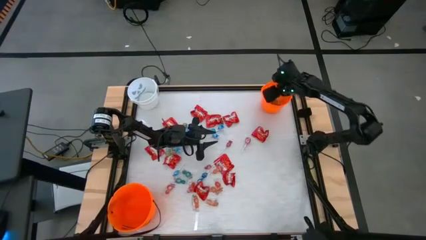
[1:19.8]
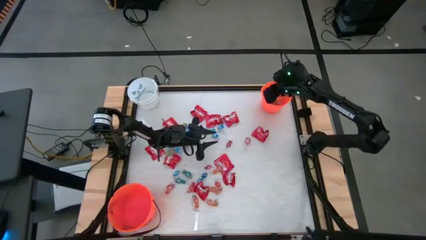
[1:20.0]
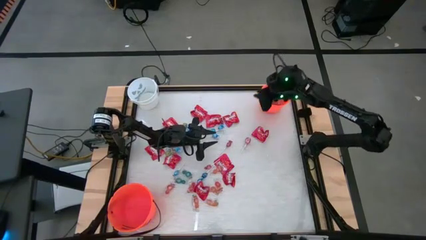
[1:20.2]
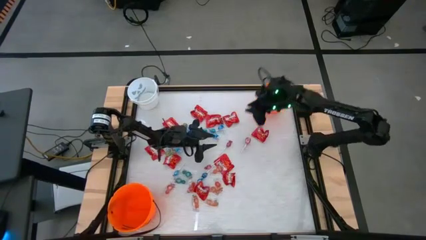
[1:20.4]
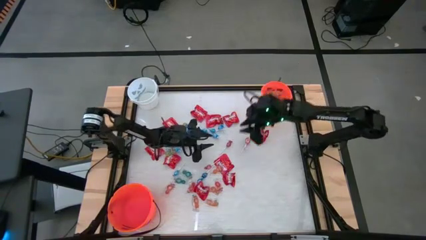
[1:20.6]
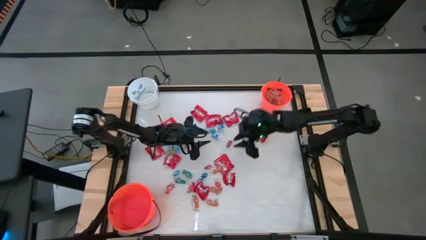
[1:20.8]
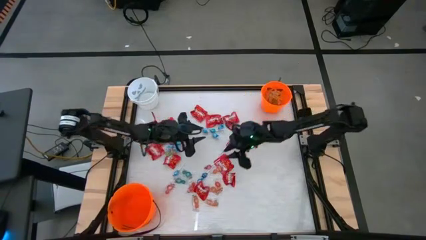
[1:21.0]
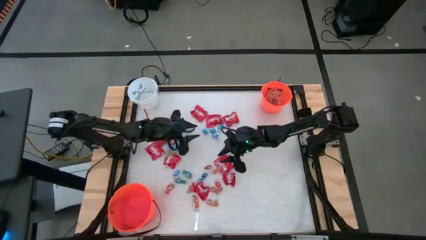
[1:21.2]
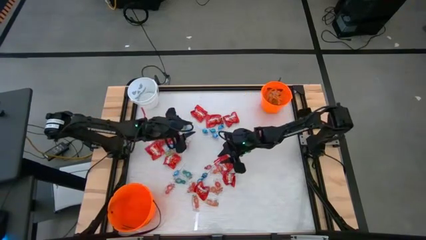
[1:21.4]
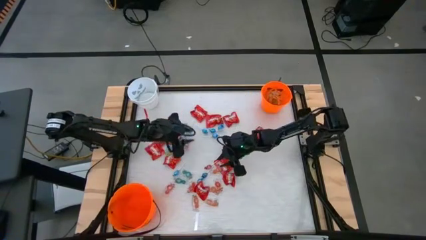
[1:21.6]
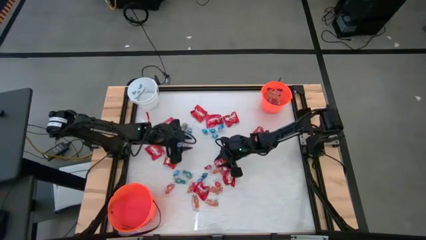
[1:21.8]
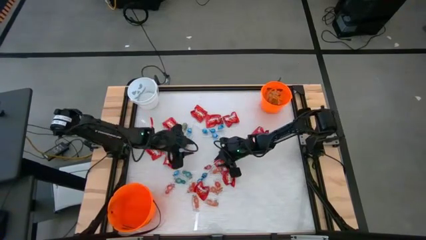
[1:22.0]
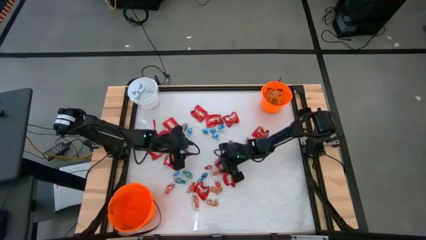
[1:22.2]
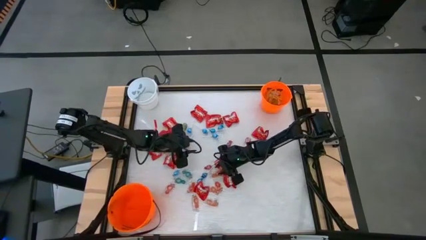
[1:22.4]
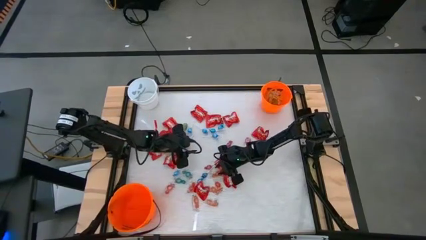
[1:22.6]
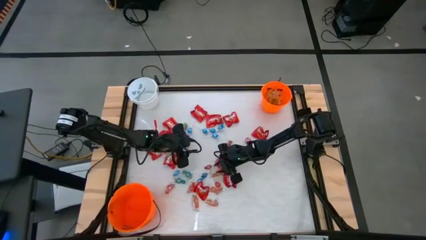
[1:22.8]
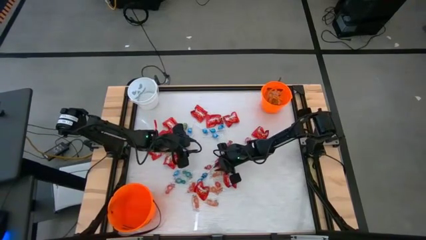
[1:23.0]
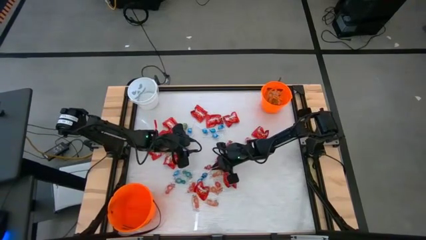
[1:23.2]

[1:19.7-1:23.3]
Task: Sort candy by brand, put in halloween buckets
Put the orange gummy into the top orange bucket

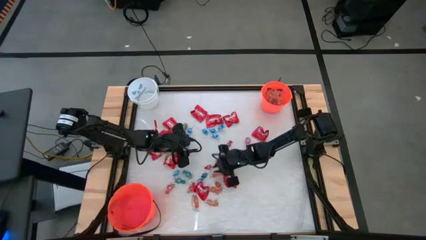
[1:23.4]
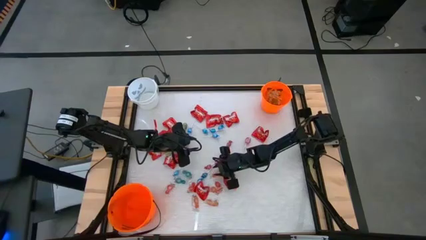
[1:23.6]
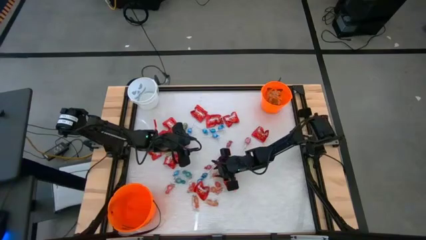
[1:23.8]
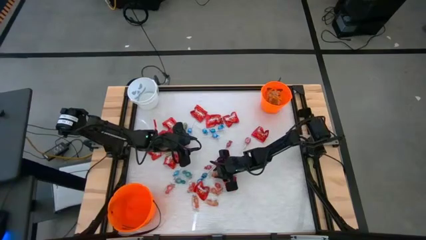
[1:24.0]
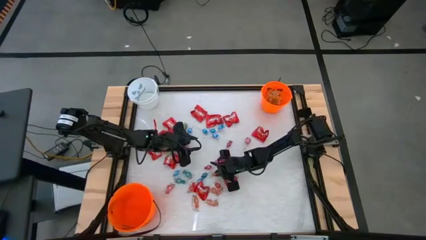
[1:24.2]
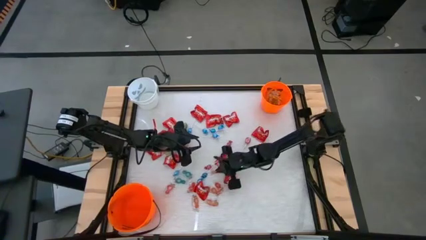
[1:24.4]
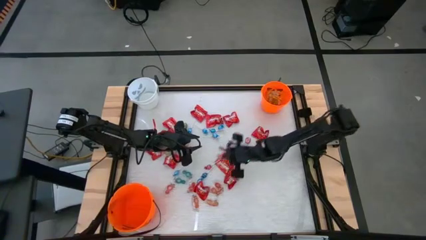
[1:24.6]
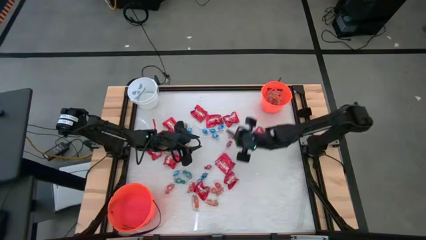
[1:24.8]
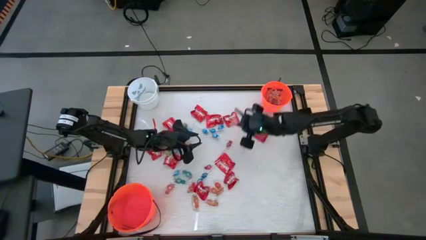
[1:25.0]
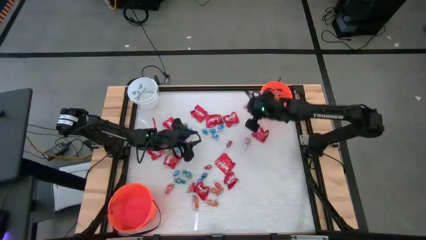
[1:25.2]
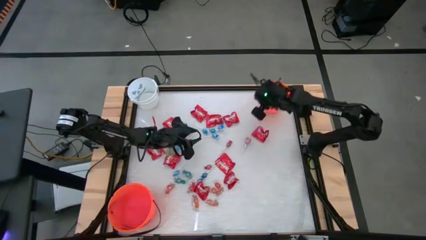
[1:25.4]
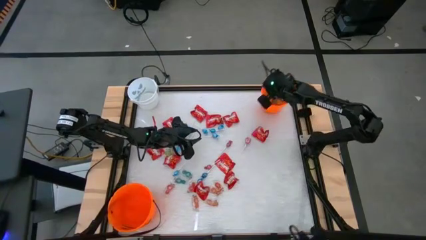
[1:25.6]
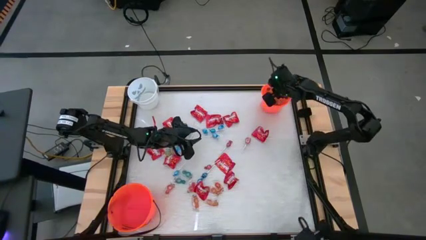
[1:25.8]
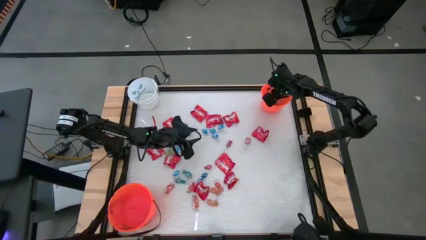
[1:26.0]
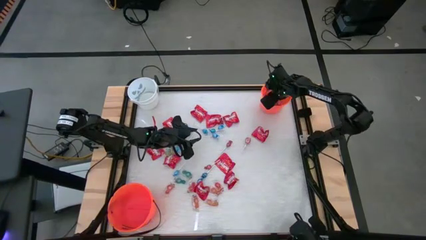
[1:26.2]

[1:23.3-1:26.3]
Put the orange gummy into the top orange bucket

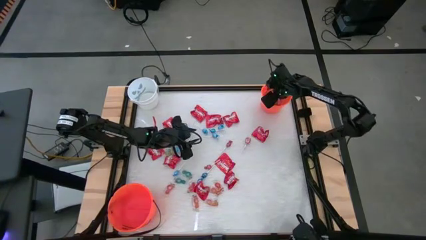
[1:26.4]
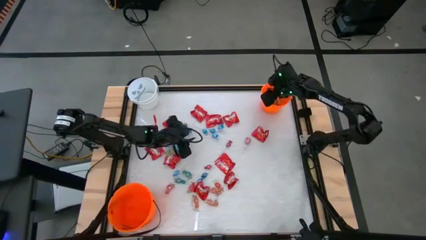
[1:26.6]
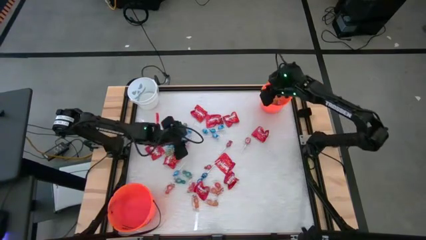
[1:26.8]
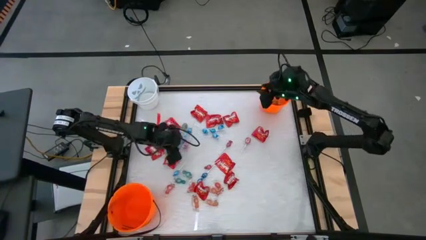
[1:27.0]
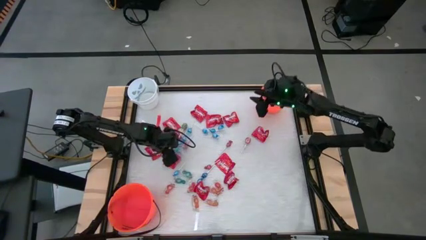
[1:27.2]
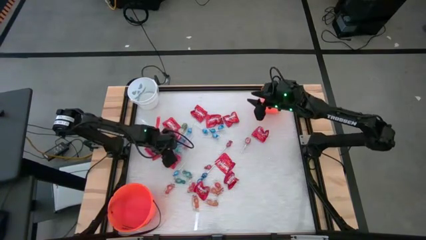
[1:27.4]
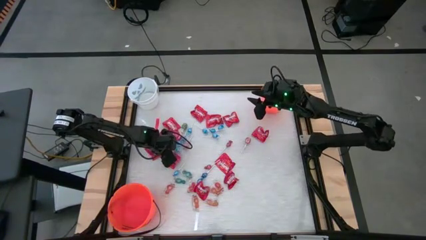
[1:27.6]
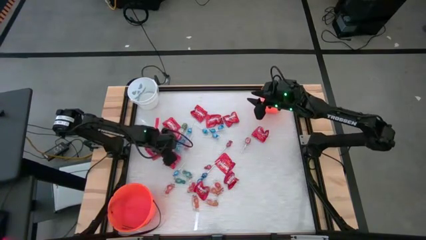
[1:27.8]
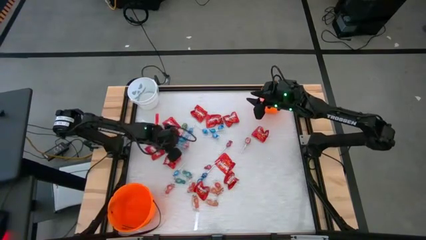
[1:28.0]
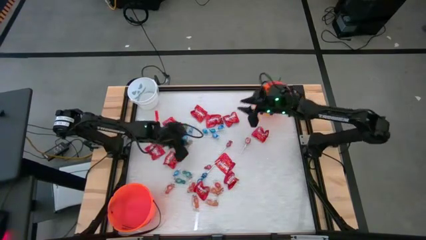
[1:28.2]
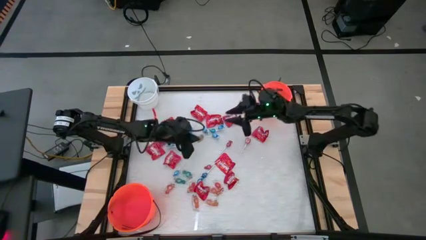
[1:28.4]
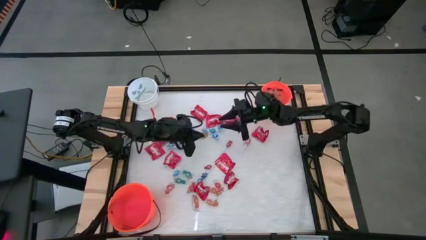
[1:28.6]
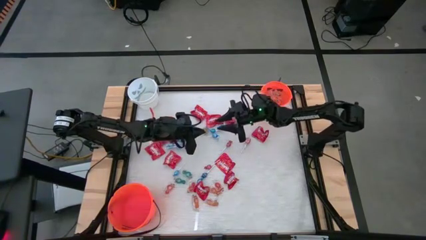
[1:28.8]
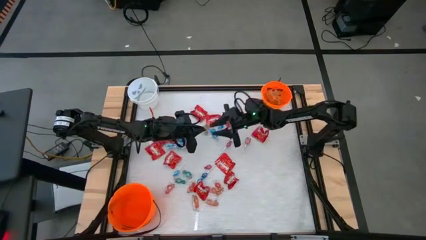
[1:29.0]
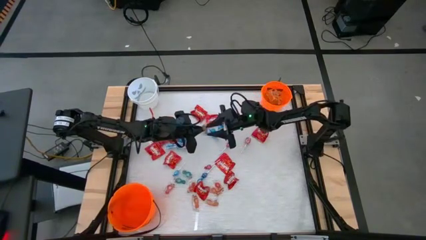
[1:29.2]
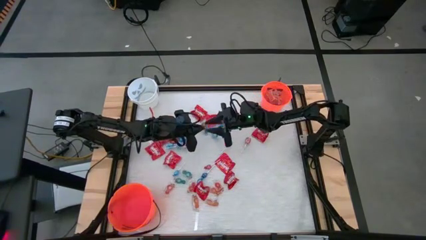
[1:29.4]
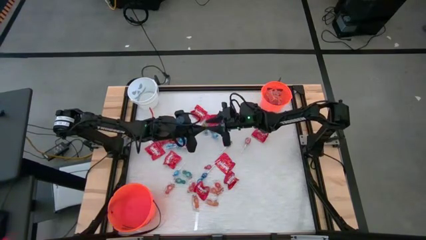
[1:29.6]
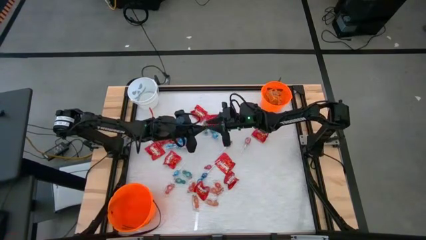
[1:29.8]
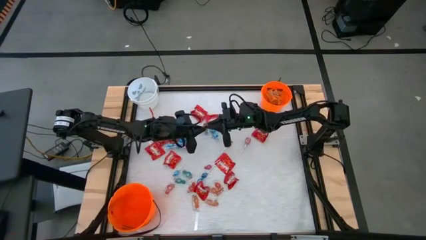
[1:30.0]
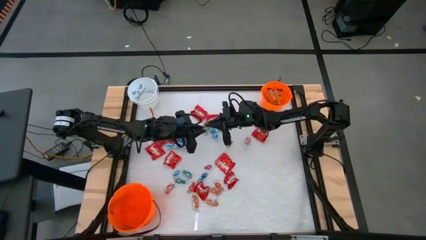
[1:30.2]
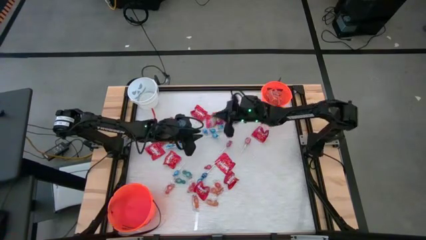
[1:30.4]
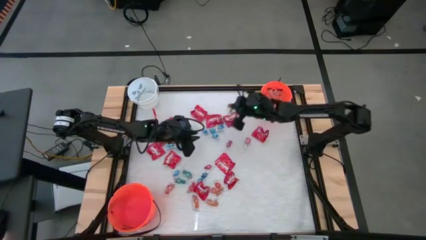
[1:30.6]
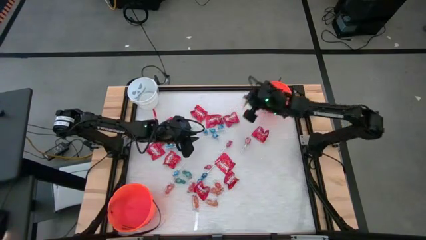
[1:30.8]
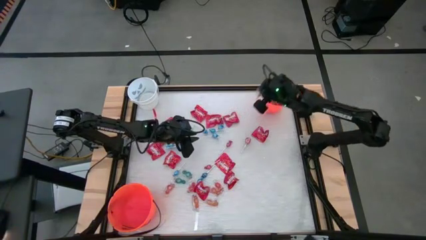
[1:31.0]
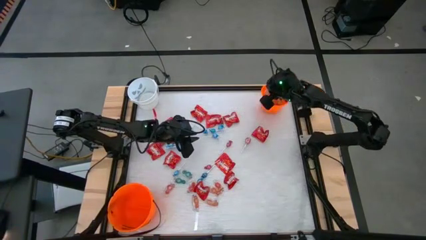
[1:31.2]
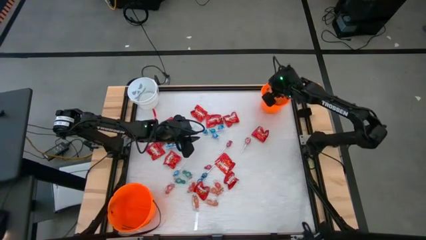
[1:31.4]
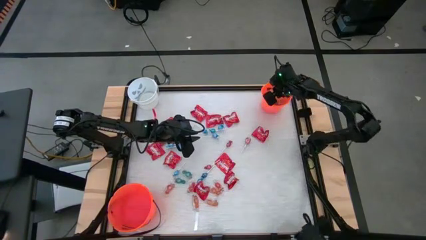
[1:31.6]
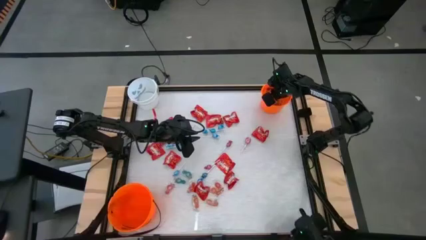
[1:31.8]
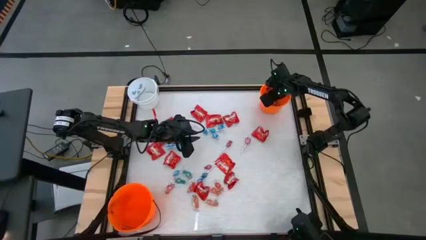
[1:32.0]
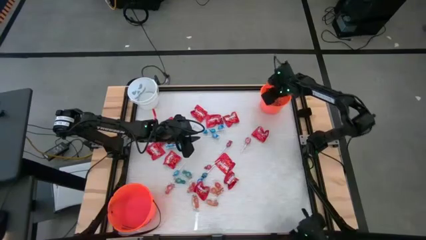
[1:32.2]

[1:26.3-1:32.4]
Put the green gummy into the top orange bucket

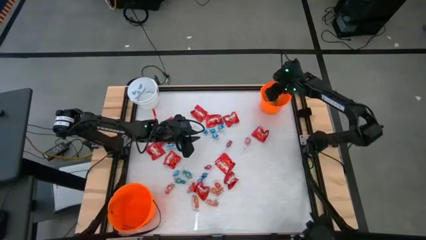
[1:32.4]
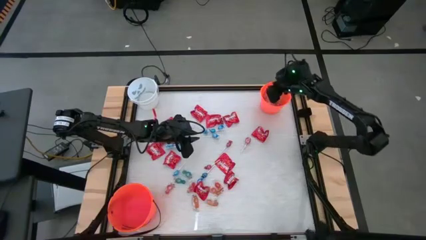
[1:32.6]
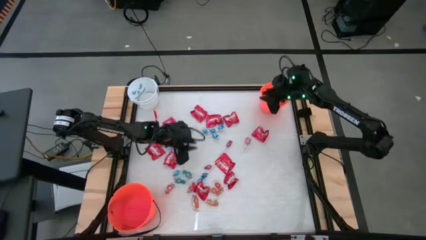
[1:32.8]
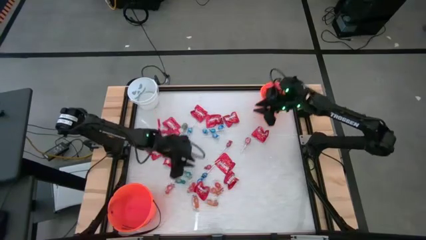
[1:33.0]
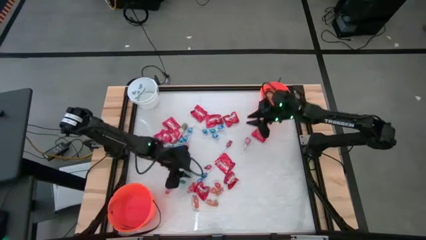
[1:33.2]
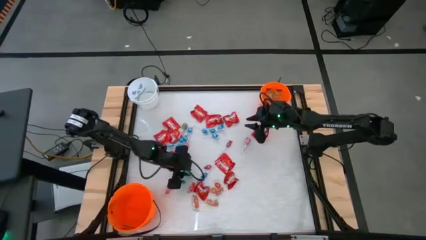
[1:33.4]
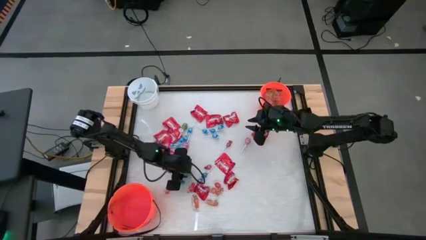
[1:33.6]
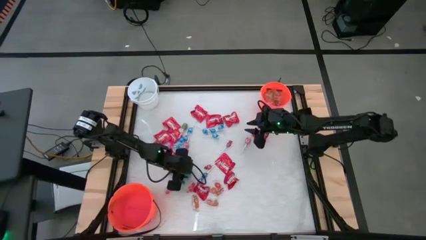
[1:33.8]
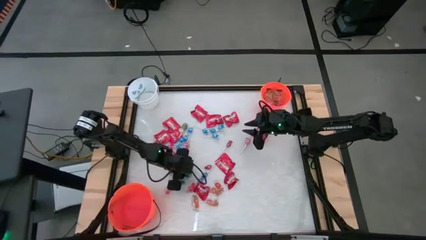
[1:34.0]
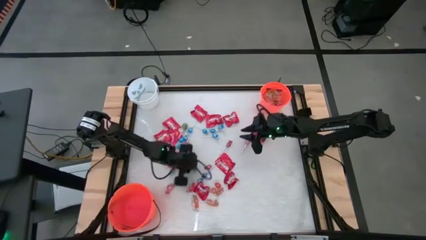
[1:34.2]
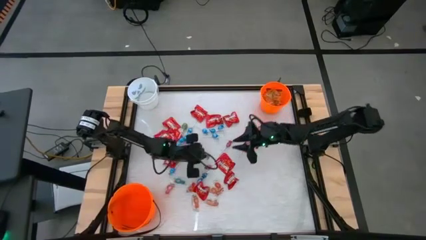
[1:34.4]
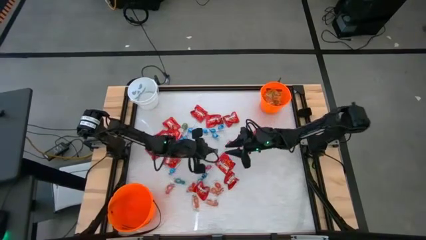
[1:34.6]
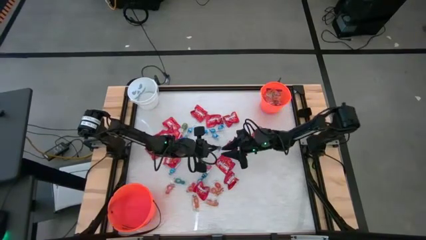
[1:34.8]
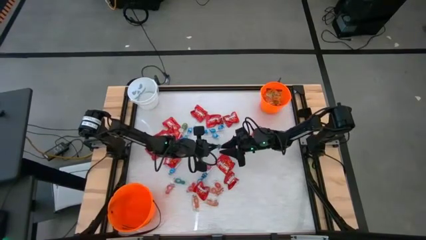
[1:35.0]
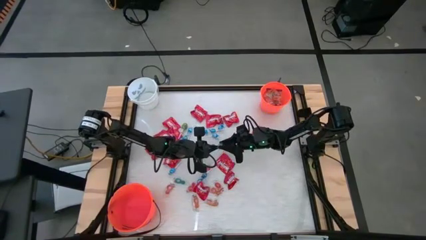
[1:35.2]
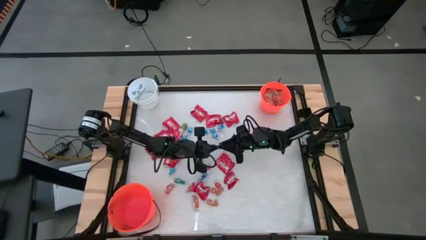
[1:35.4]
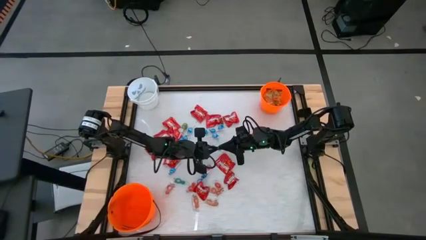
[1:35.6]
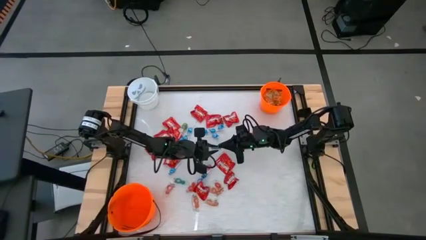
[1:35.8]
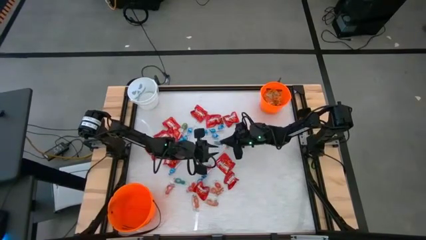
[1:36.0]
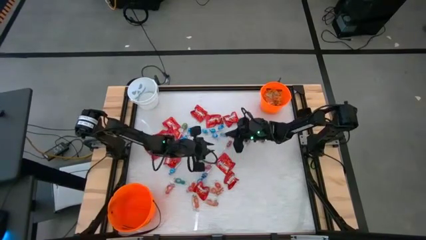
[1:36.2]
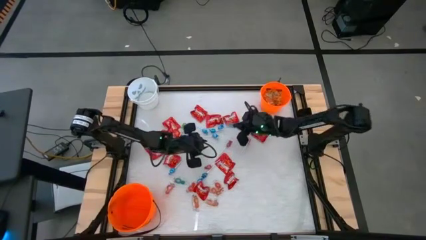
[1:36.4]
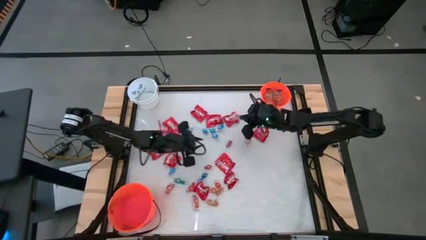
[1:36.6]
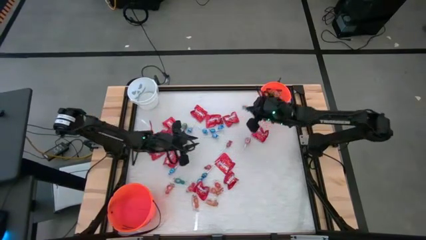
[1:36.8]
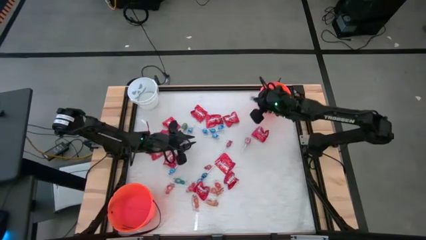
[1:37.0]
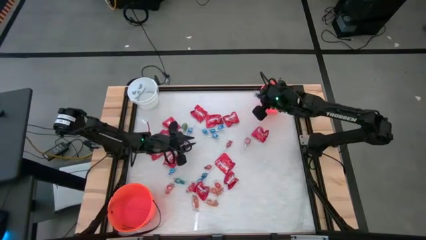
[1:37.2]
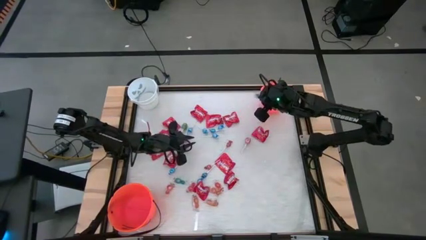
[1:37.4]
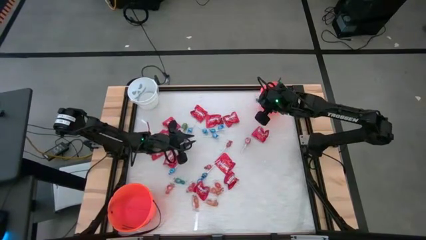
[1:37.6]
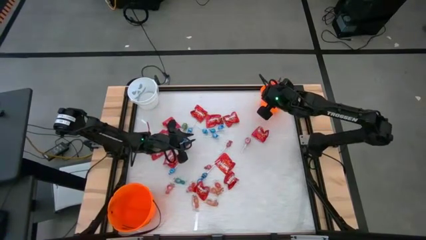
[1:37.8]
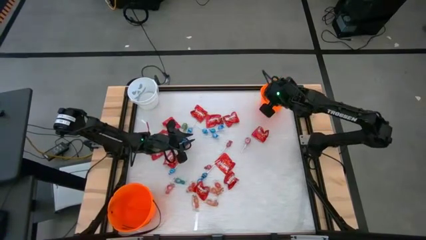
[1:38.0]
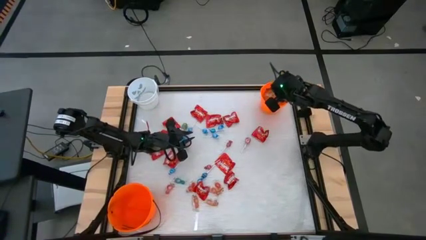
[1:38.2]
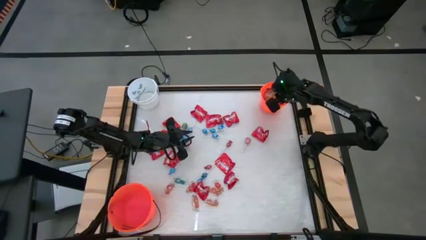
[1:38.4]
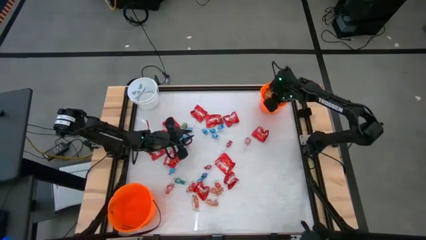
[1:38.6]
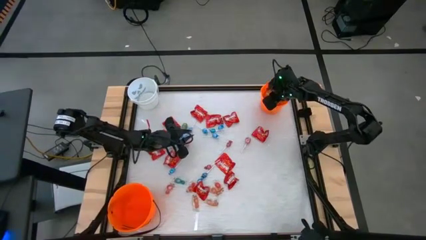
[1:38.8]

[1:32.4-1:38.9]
Put the top blue gummy into the top orange bucket
